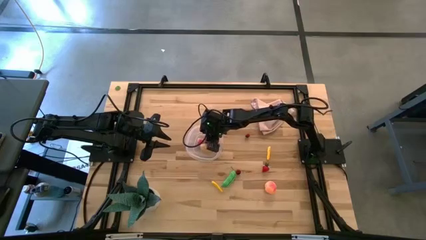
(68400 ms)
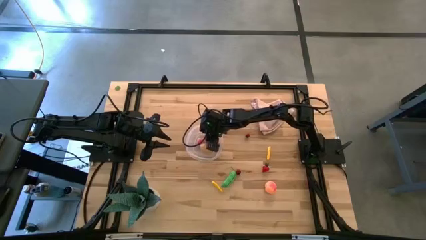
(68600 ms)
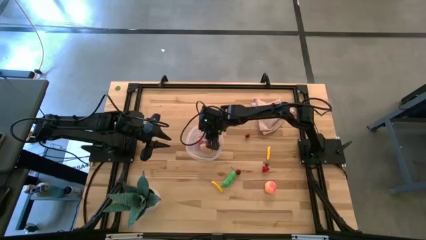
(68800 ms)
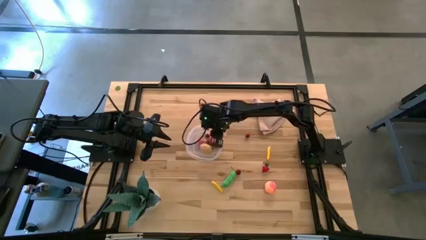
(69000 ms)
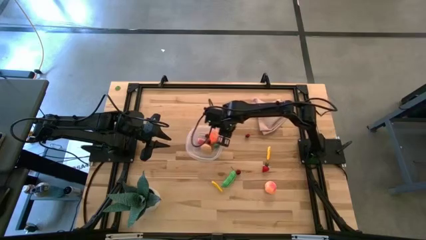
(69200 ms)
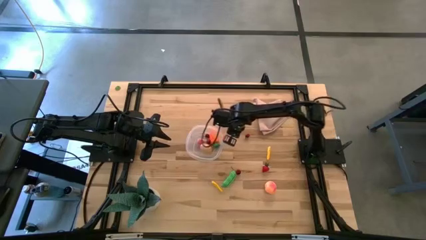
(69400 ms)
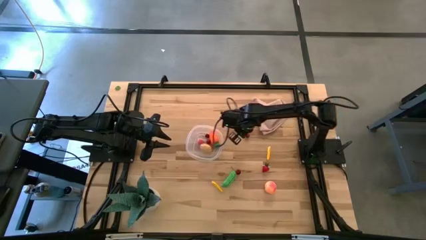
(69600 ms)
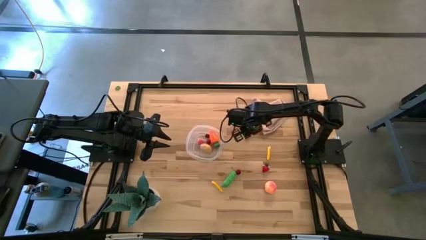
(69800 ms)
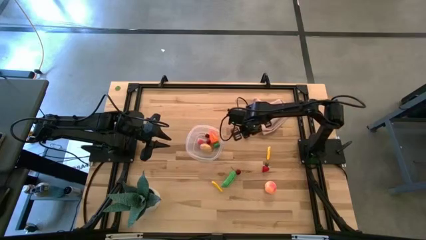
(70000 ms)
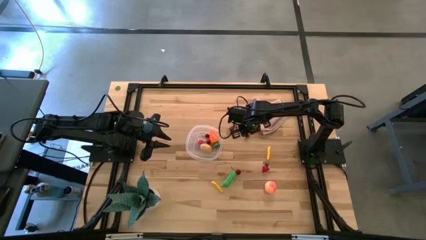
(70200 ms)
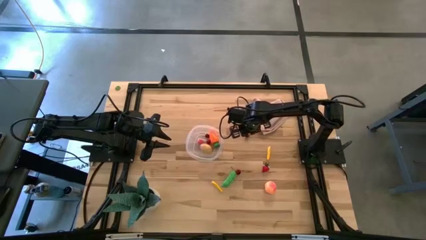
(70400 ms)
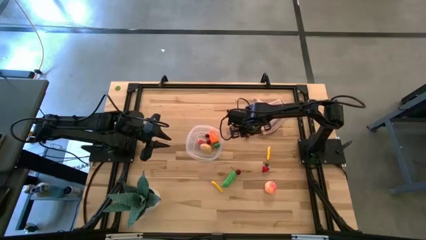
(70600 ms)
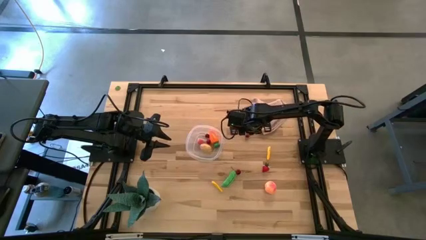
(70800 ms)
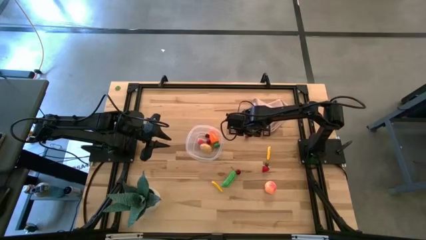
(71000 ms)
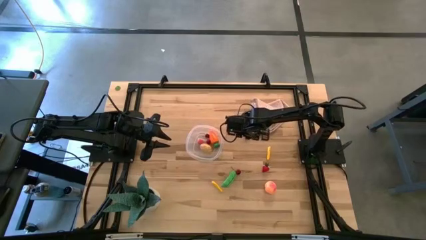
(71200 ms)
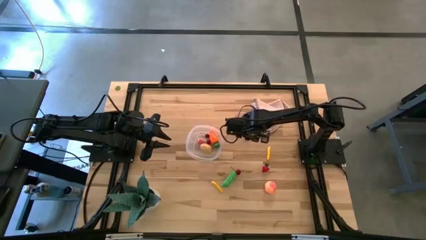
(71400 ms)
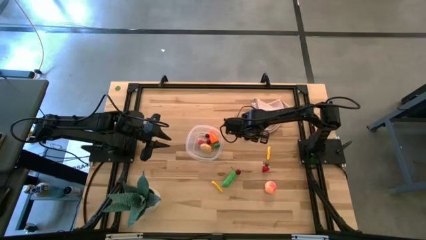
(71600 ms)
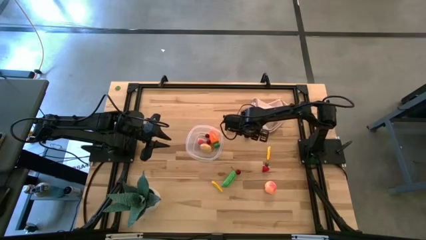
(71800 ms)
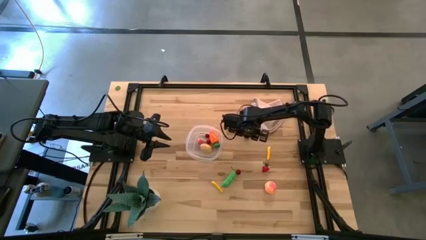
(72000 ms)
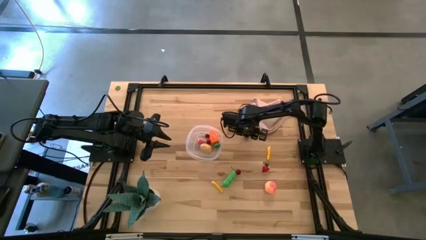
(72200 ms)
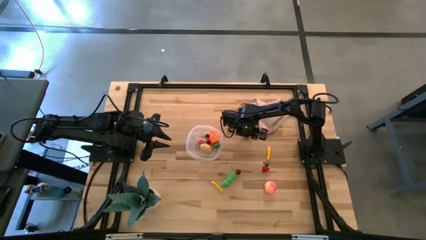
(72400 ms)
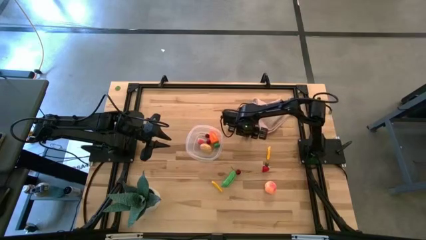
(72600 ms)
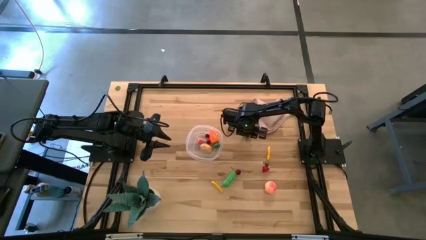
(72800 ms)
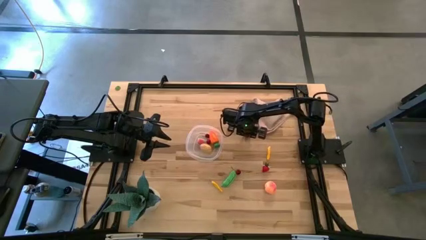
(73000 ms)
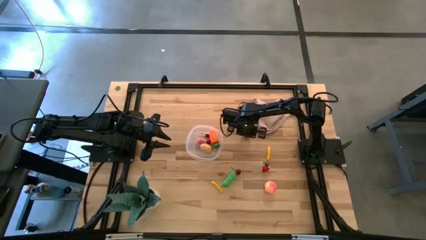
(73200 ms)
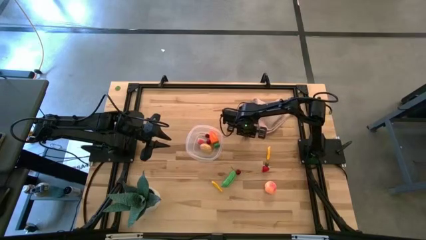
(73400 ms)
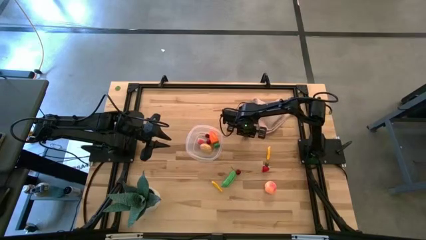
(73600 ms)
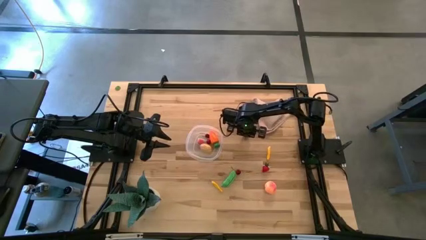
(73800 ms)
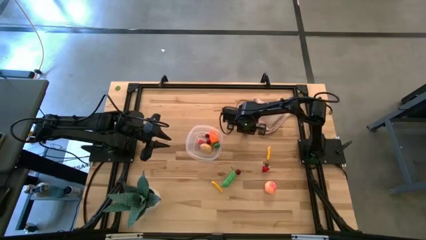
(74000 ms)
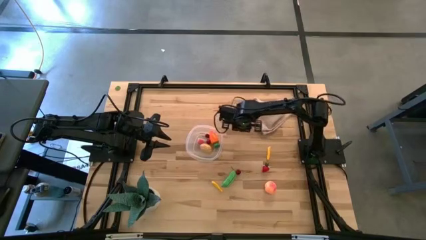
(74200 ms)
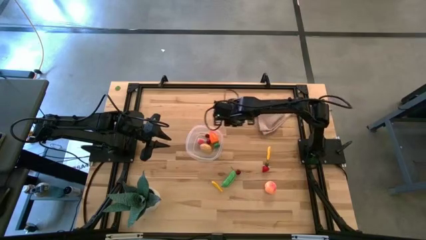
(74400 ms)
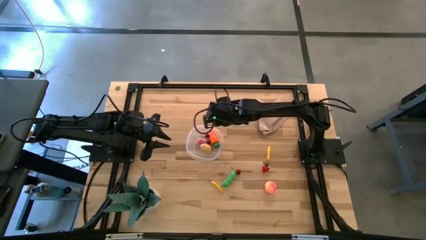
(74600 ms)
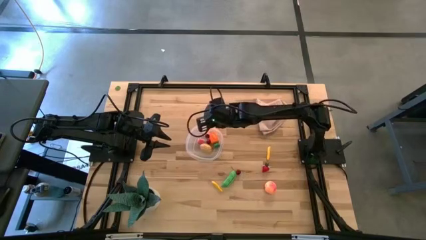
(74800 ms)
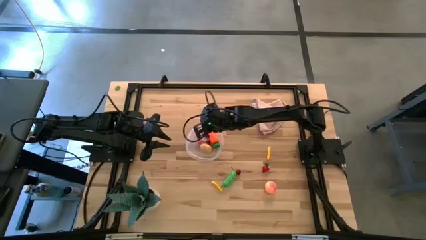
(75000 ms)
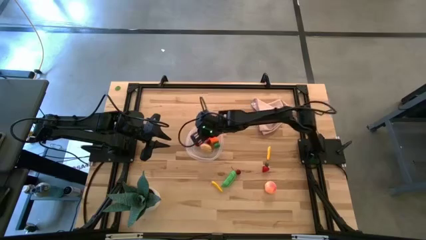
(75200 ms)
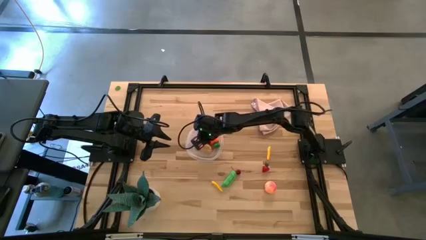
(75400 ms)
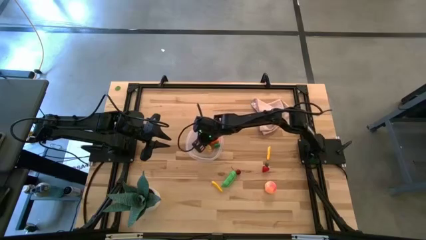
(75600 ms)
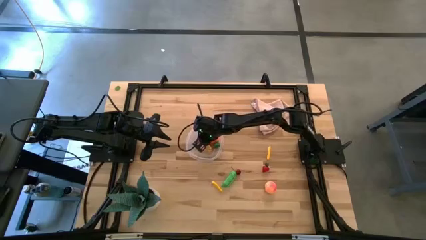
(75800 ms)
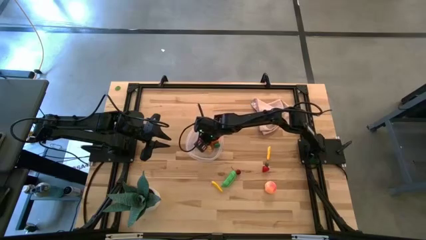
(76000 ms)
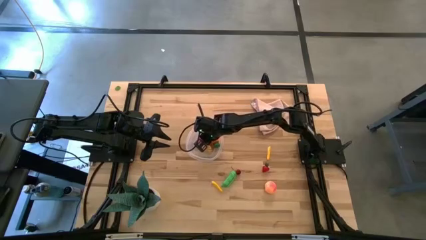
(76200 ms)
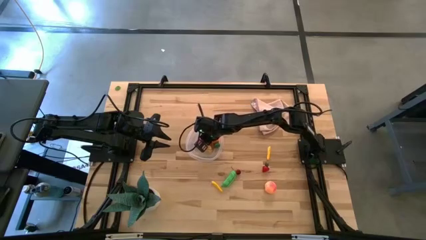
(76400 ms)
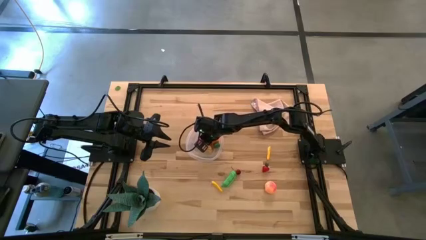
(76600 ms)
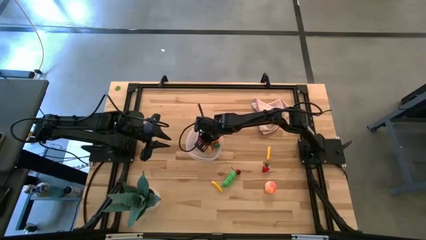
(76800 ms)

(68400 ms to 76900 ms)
Task: Pick and placing Produce into tupperware
Put the top cherry into the transparent bin

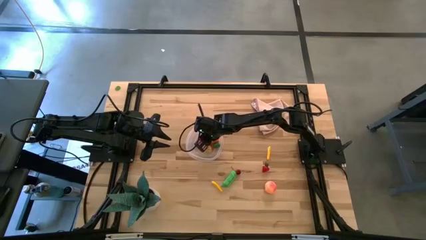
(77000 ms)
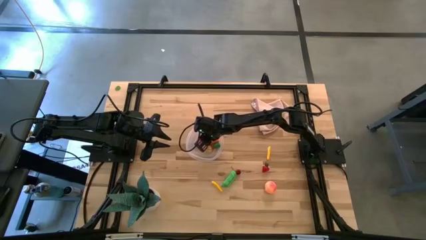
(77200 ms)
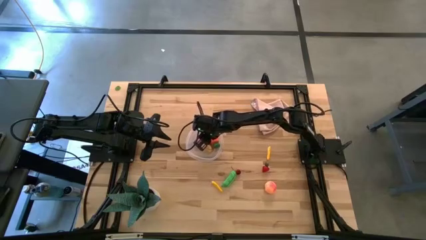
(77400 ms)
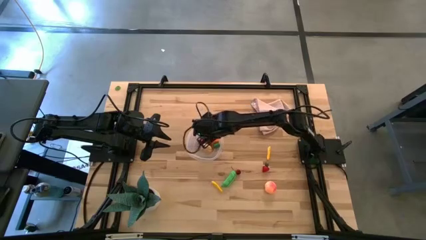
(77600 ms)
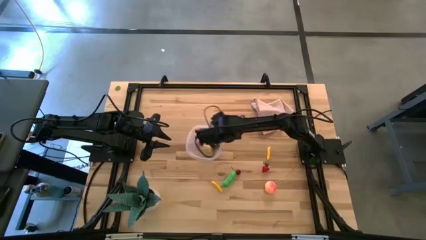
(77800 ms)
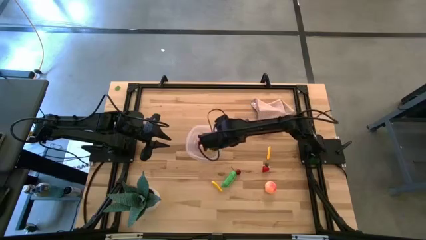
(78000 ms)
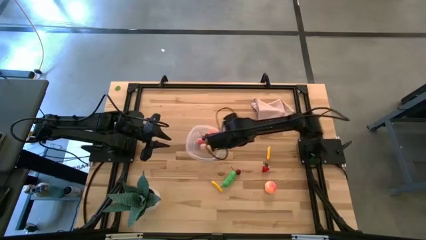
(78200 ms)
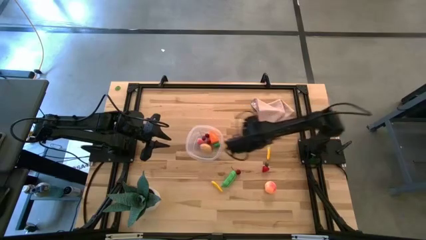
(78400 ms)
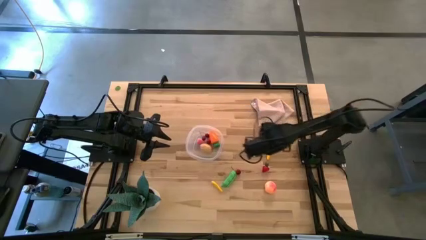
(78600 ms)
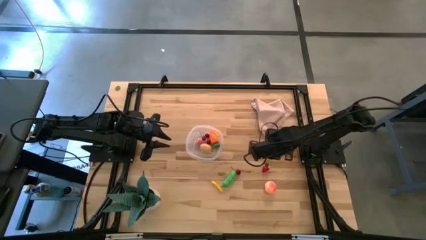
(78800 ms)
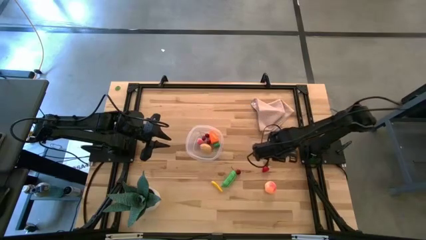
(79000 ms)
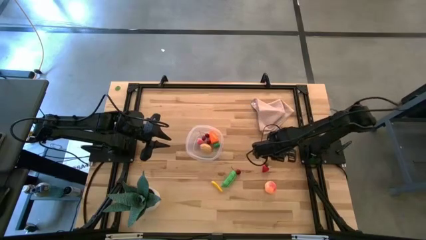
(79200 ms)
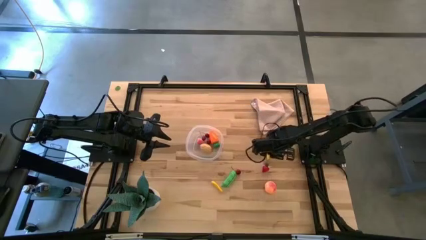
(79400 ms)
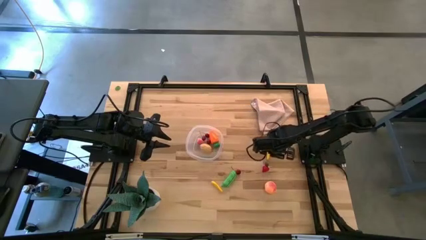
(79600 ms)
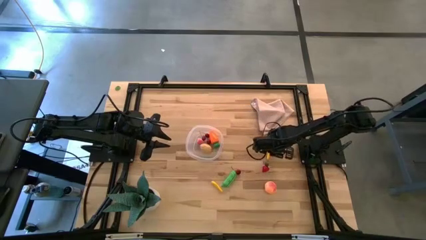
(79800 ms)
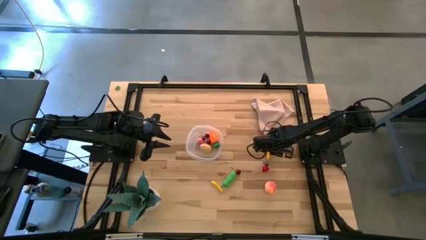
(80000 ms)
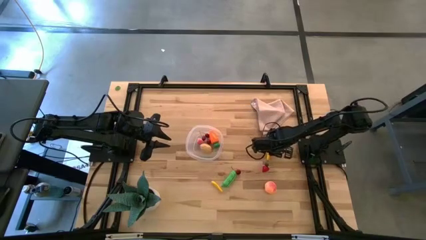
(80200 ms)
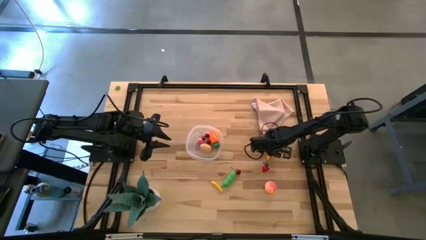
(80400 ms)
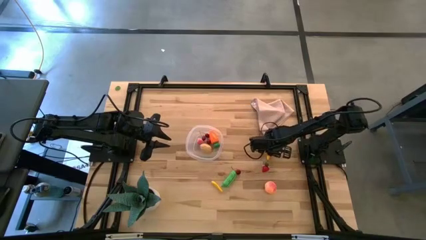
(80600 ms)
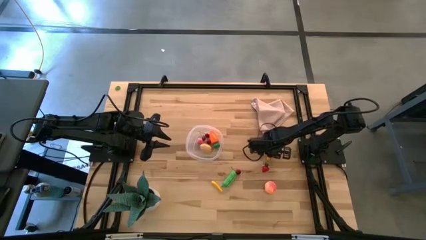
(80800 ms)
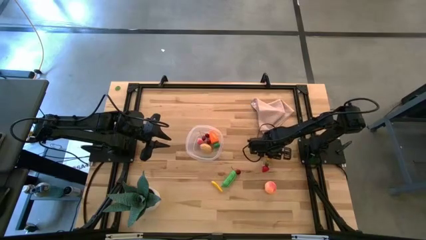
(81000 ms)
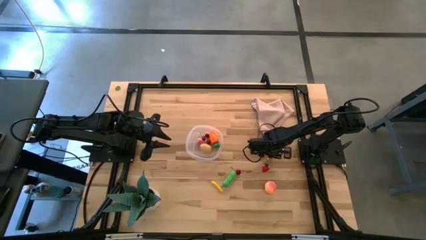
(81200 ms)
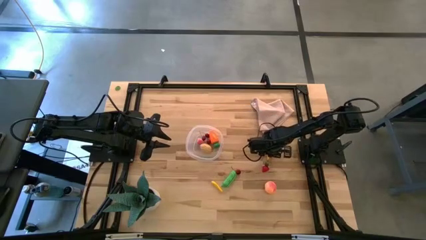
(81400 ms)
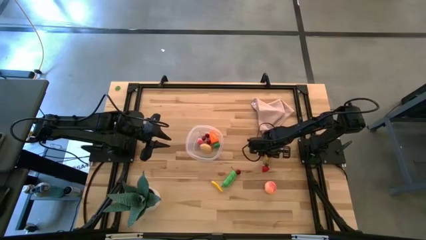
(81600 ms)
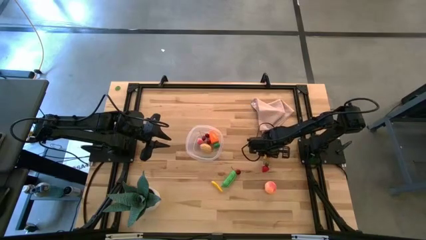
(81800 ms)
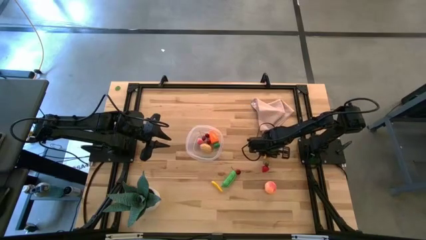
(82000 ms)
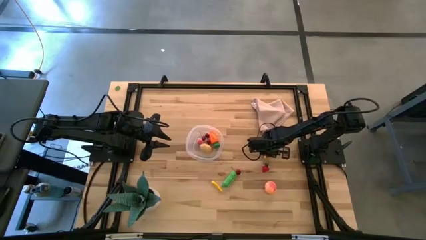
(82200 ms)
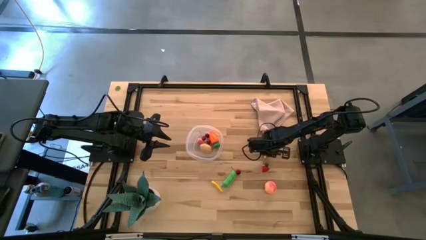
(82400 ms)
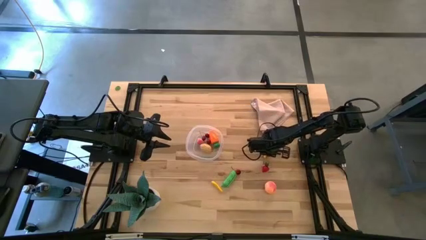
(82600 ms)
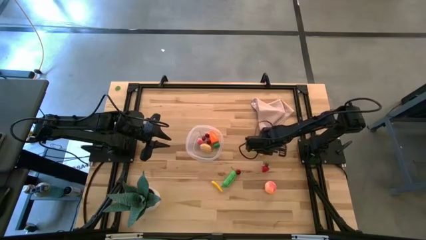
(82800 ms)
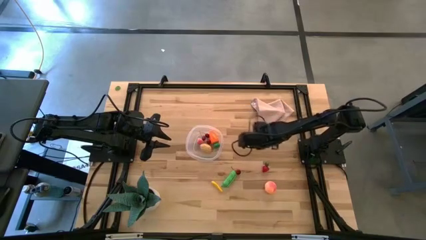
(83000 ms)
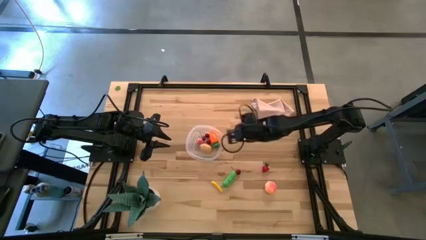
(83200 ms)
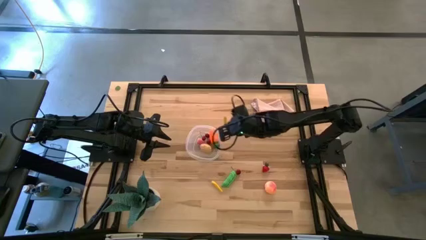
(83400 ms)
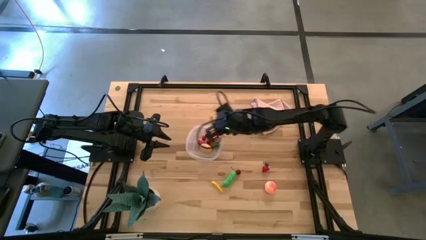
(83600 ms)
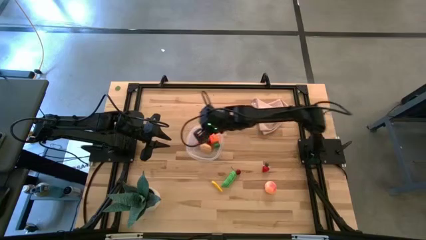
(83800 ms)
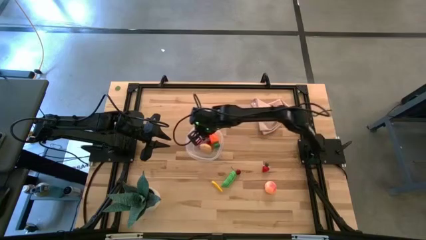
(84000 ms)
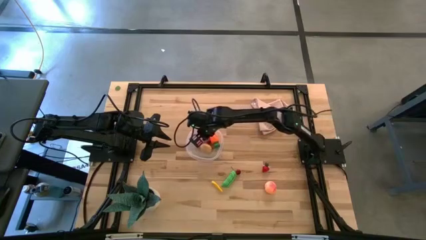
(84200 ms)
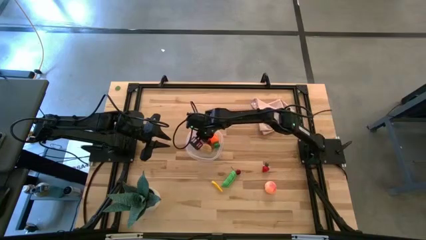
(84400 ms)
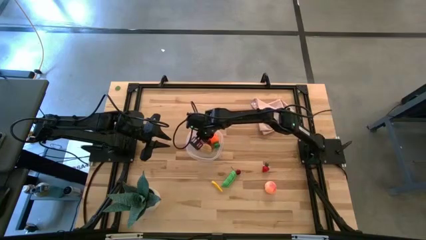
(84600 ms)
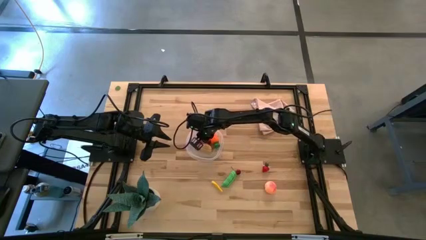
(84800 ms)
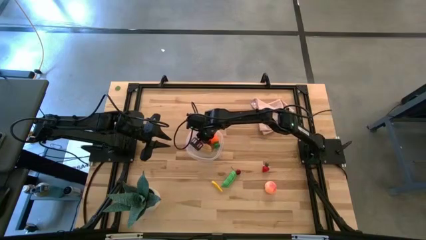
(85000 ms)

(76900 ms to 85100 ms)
Put the top corn into the transparent bin
